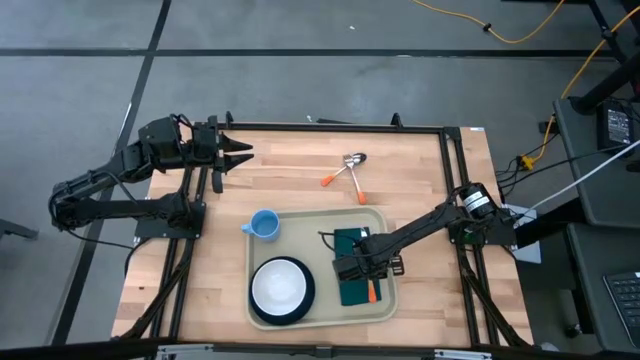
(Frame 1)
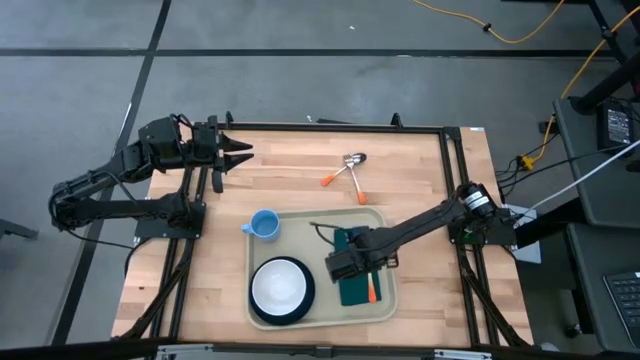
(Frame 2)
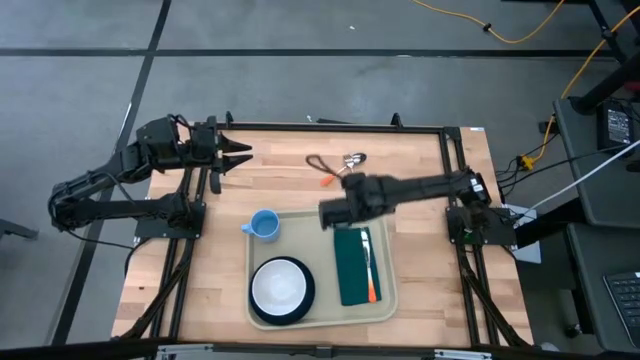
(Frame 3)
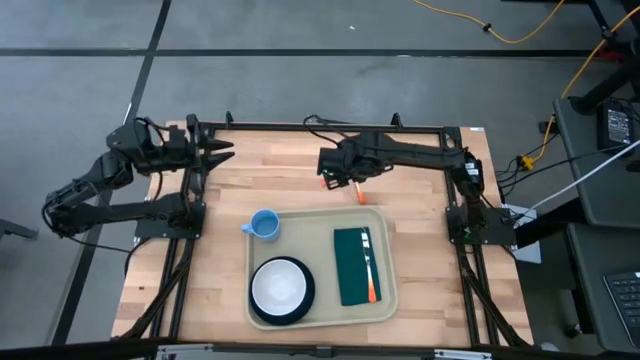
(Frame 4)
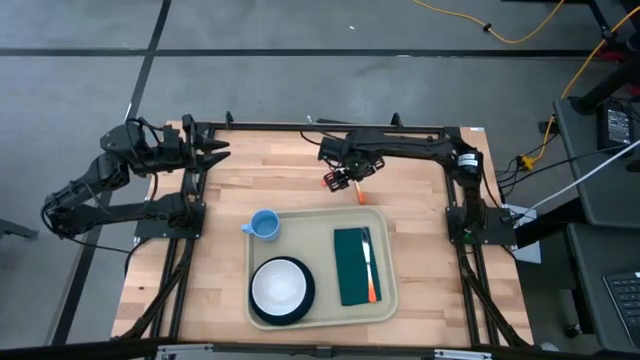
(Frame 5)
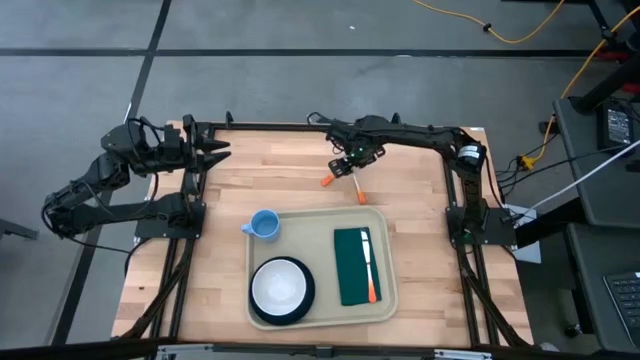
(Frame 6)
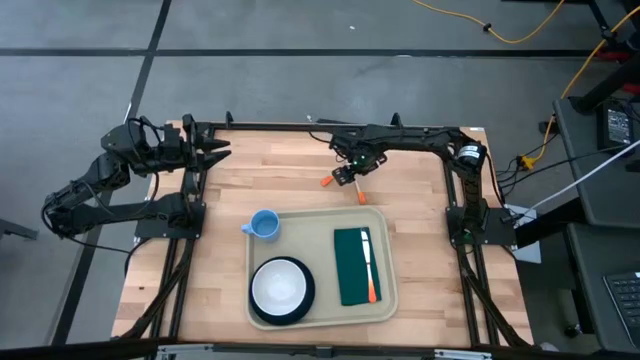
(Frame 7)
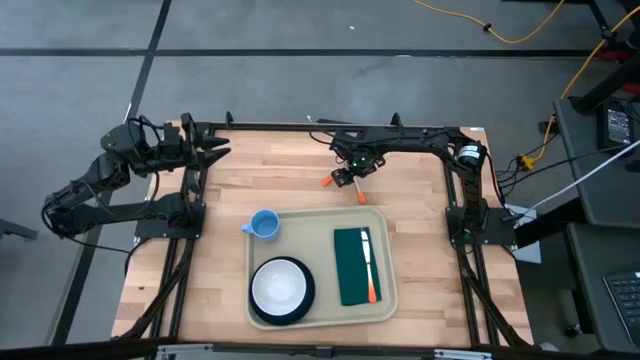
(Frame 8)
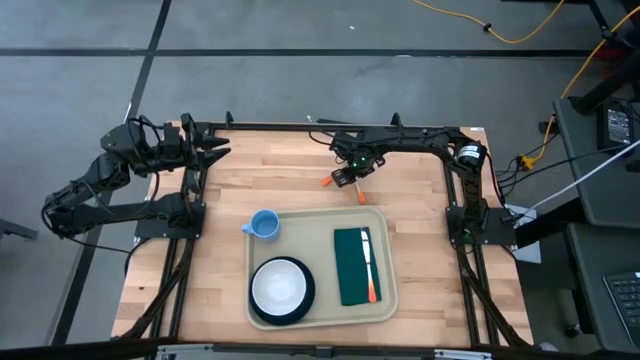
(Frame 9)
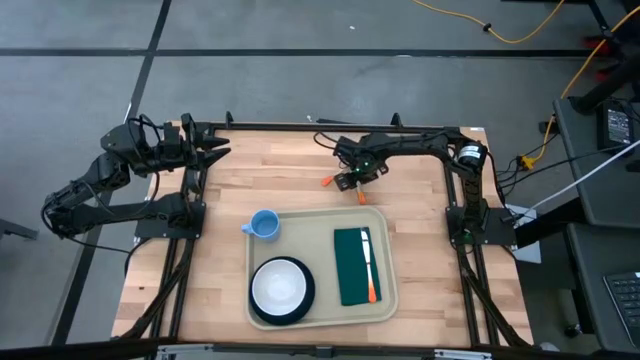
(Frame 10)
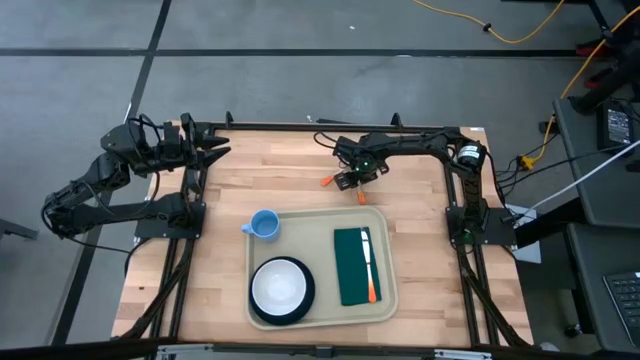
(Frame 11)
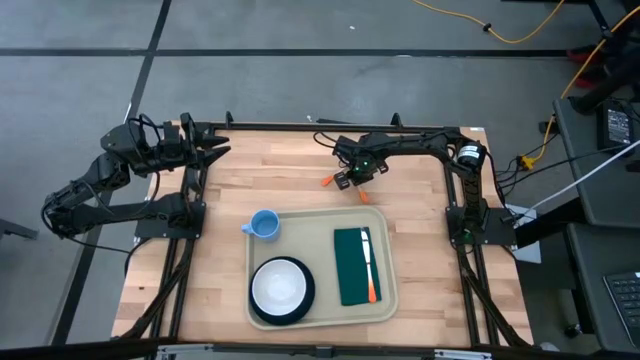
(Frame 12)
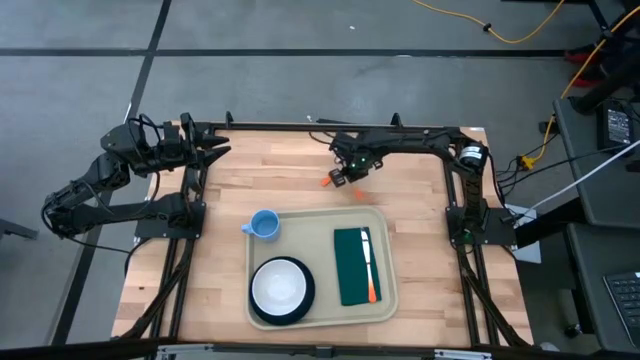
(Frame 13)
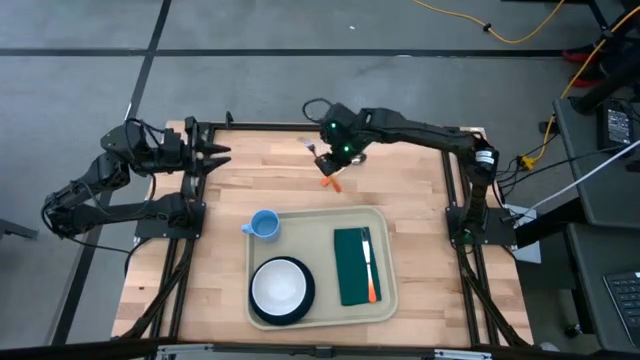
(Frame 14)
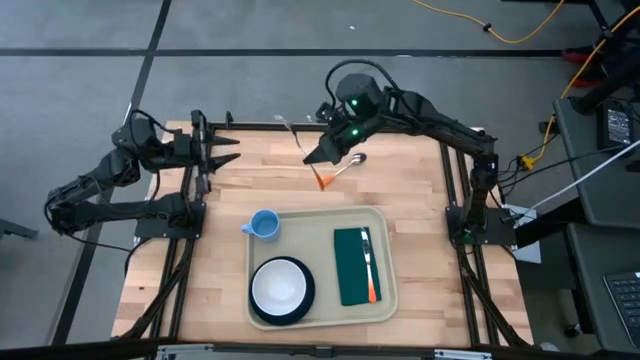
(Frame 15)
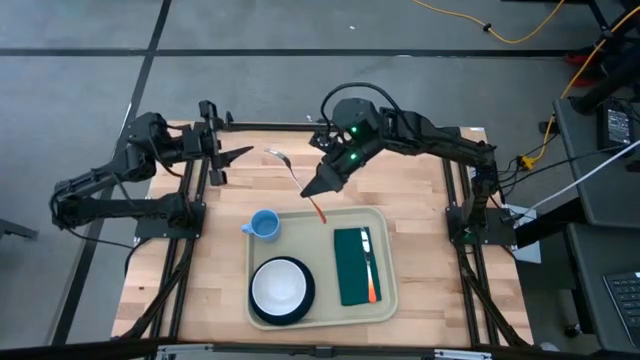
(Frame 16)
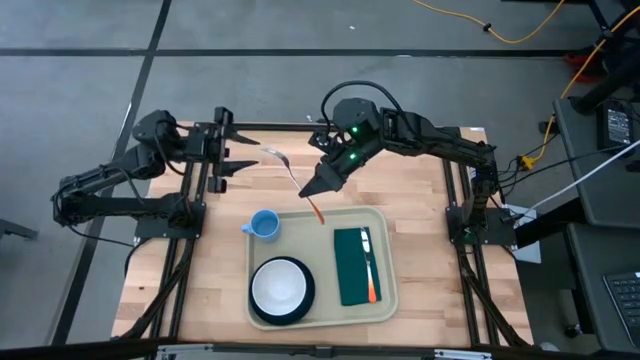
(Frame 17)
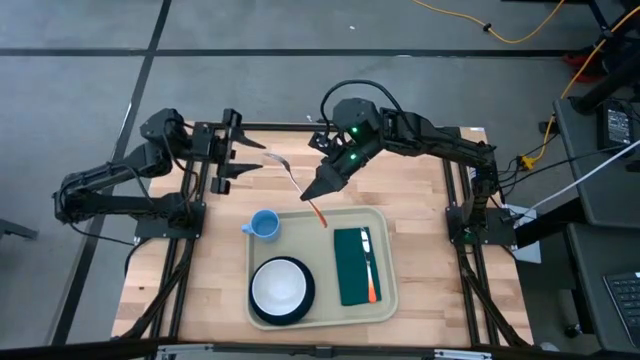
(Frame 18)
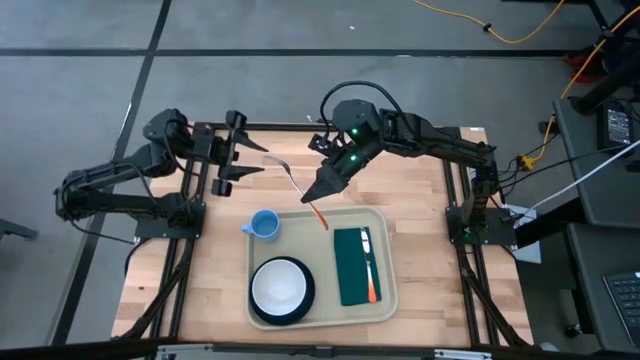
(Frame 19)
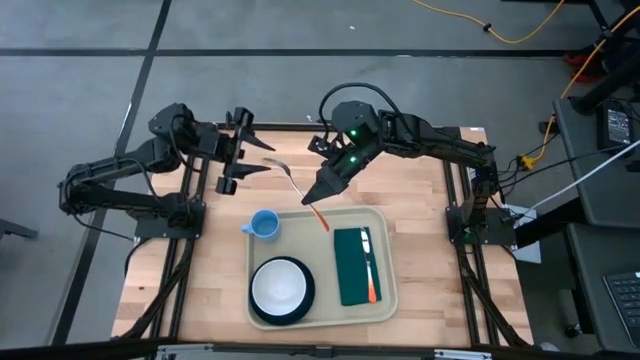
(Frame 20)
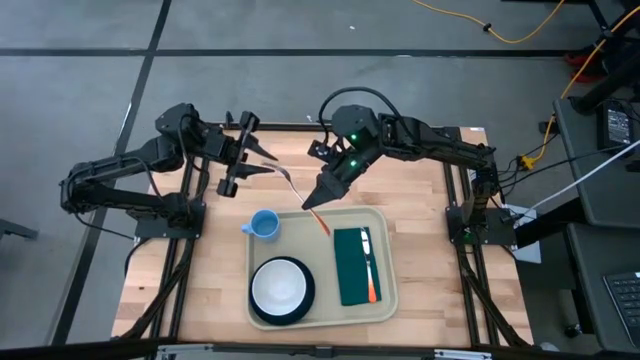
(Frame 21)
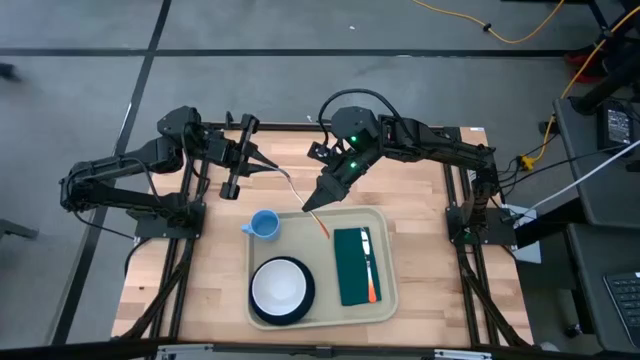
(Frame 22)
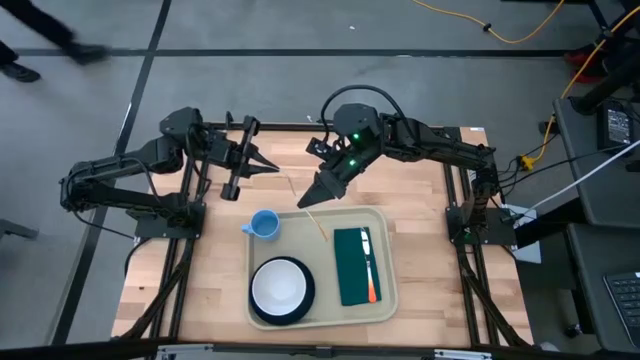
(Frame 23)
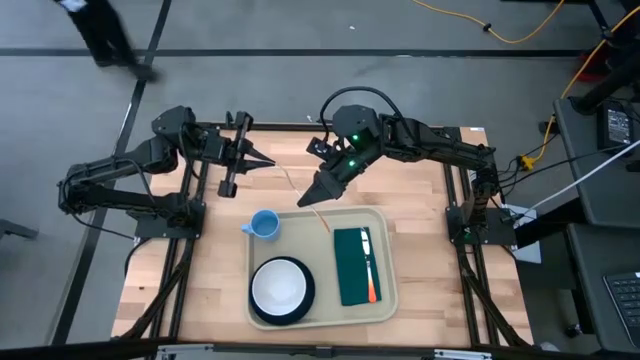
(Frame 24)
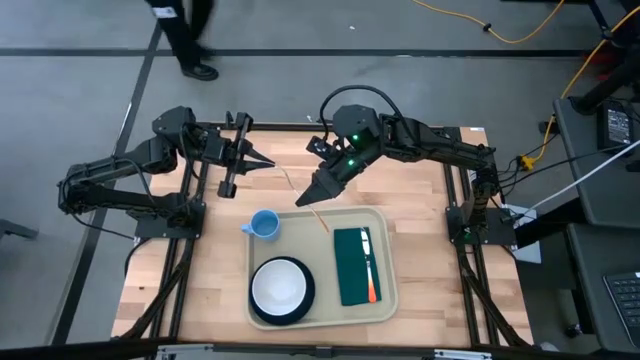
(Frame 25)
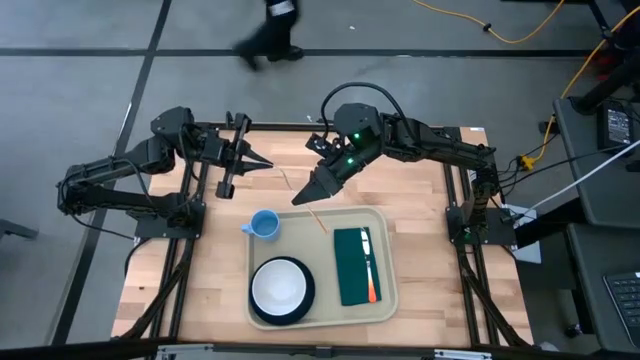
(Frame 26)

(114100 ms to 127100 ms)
Task: Set up tray
Put the orange fork on top of the green napkin to the left of the orange knife

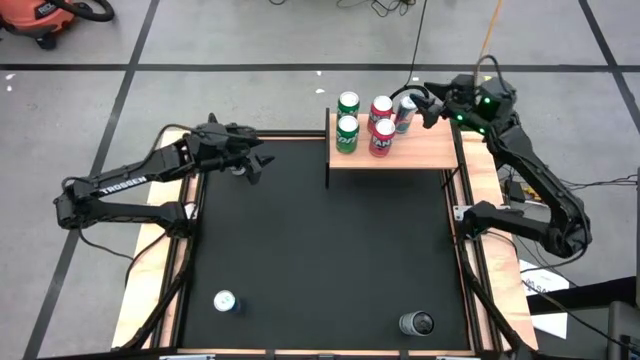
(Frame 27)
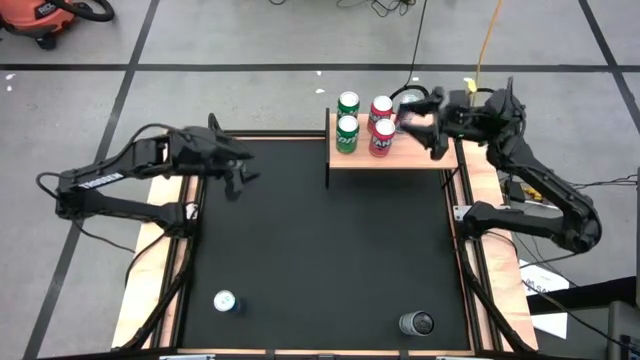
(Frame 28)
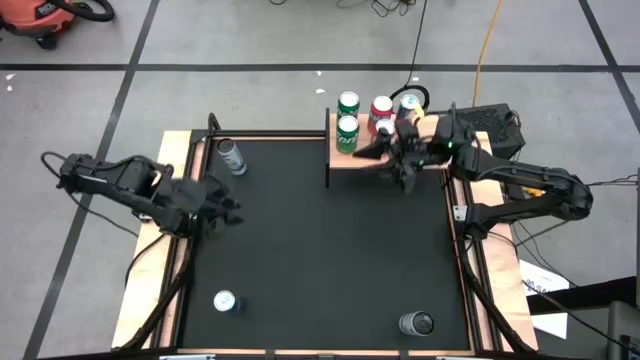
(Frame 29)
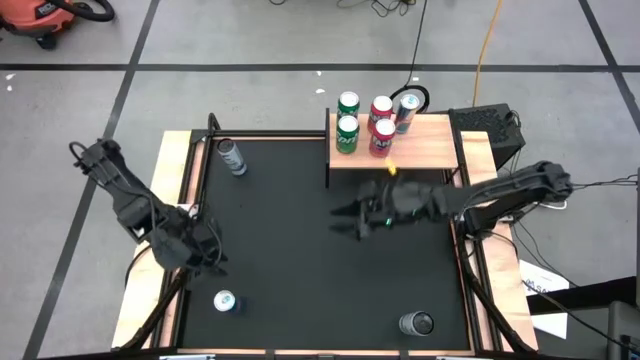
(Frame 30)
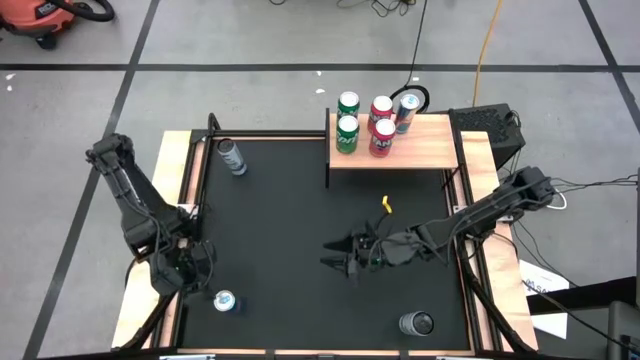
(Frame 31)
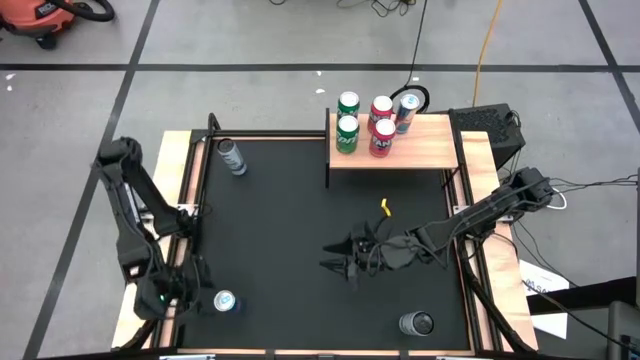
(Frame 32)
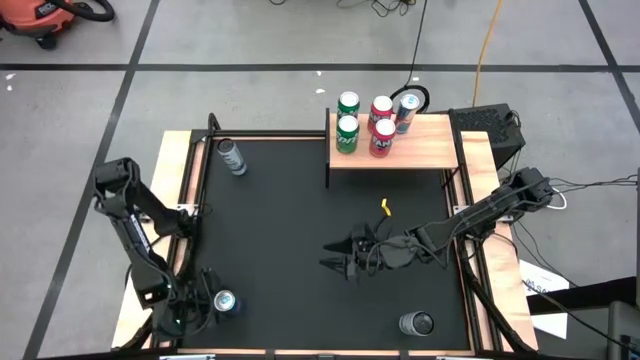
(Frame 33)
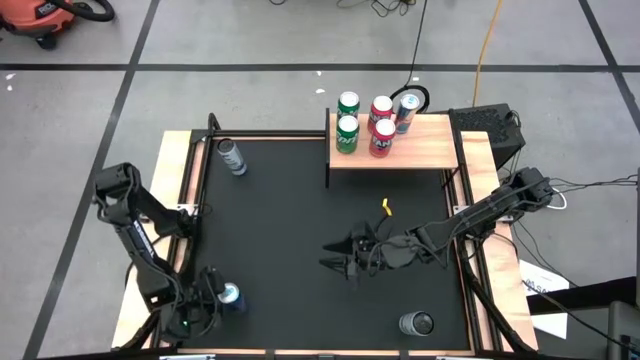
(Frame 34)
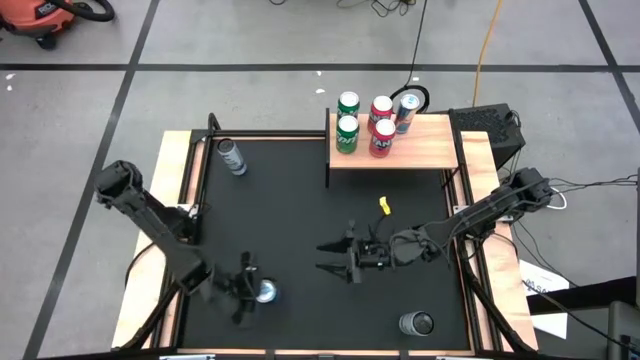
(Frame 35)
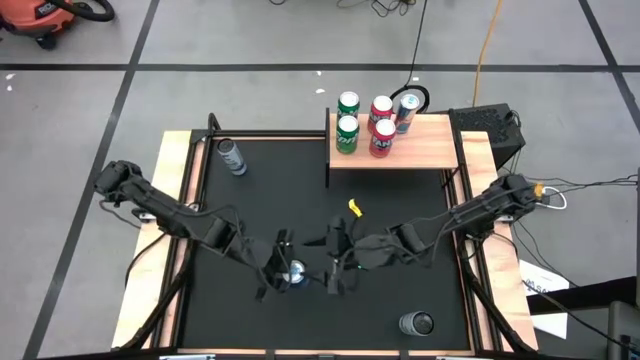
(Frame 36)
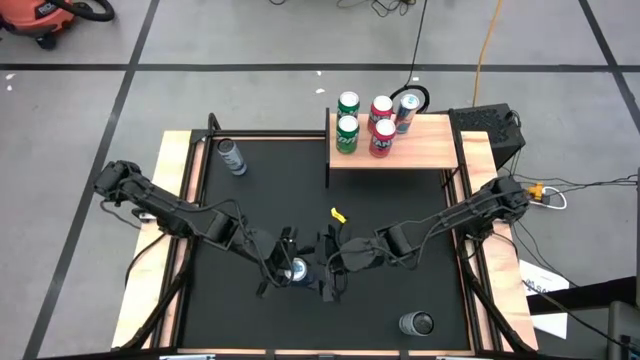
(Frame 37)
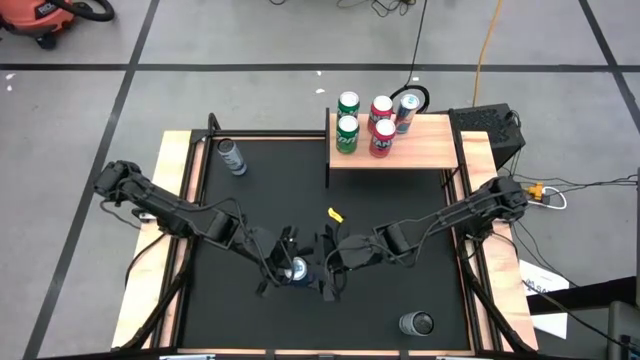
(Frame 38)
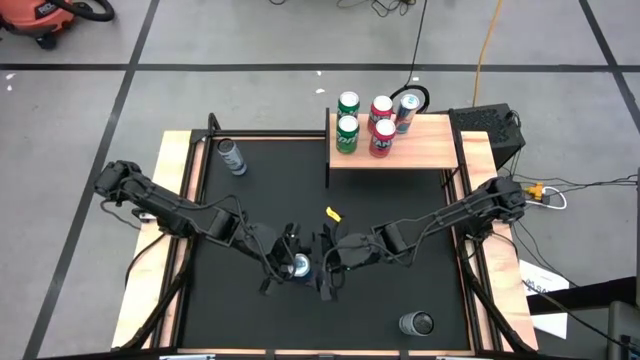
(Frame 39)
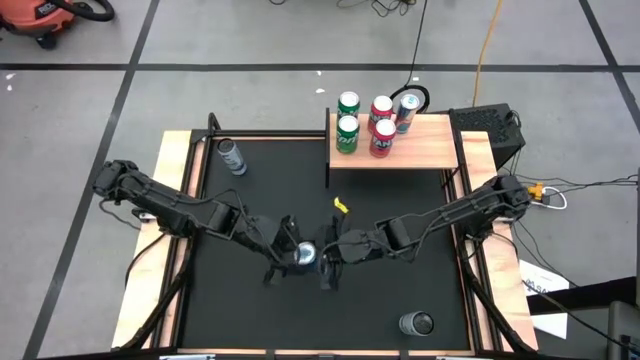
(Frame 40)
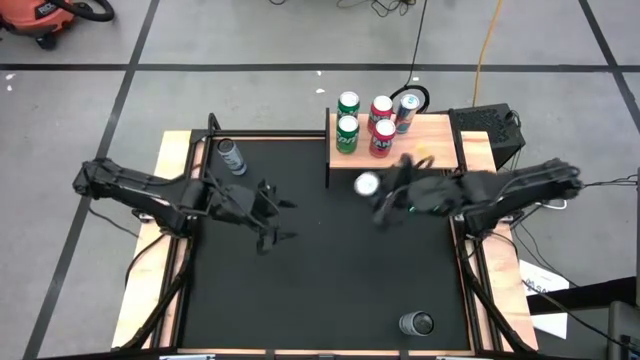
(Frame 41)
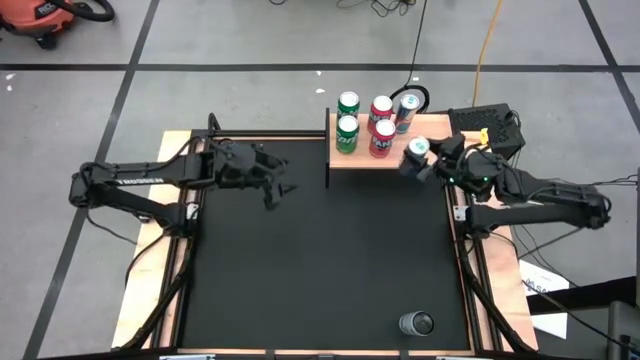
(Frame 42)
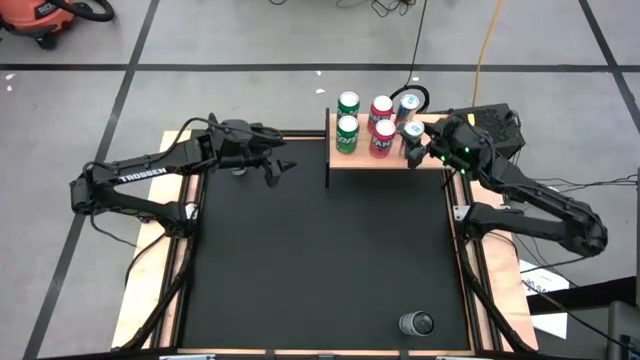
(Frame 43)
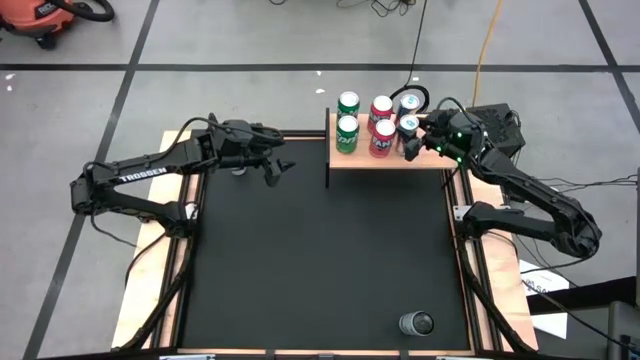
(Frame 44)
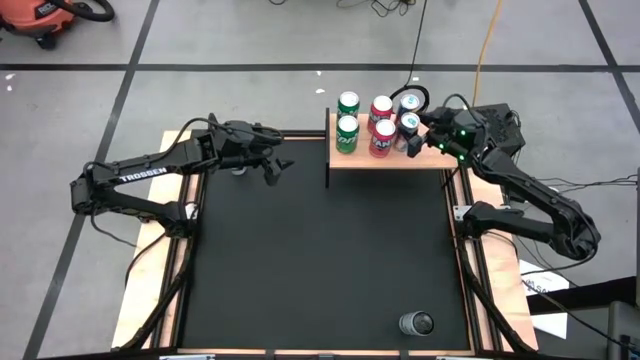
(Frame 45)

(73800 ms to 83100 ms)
Task: Place canned beverage on shelf
Put the blue soda can on the shelf aligned with the other blue soda can
